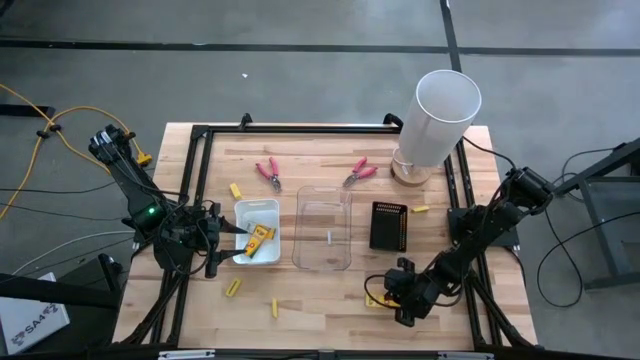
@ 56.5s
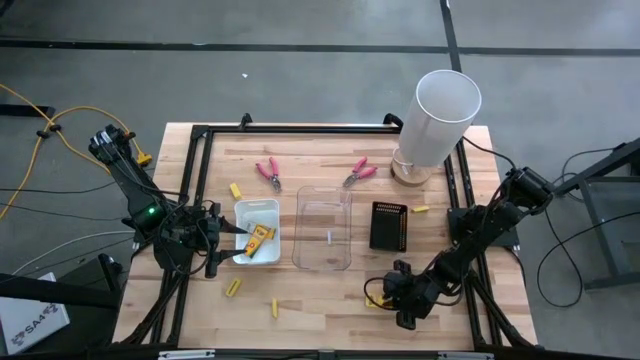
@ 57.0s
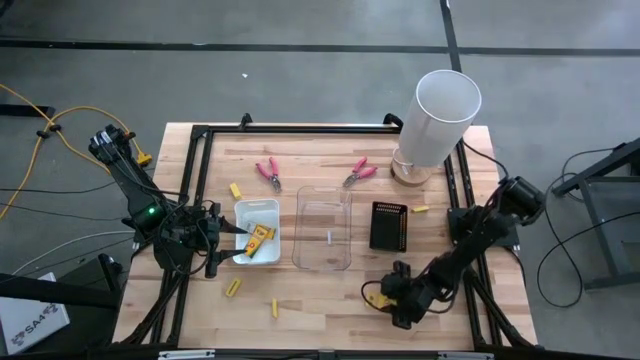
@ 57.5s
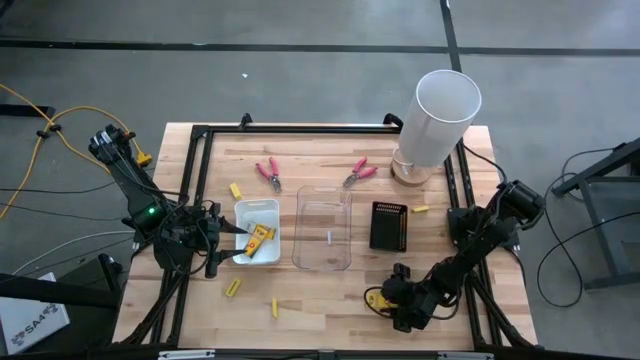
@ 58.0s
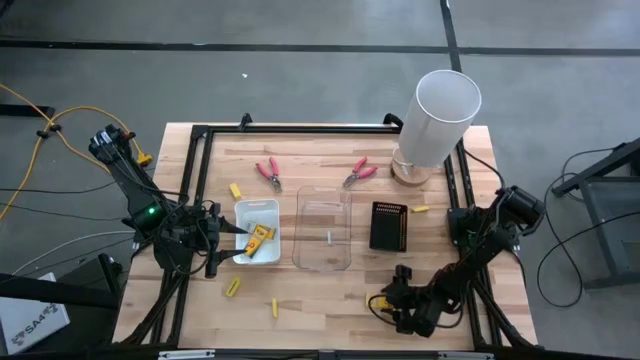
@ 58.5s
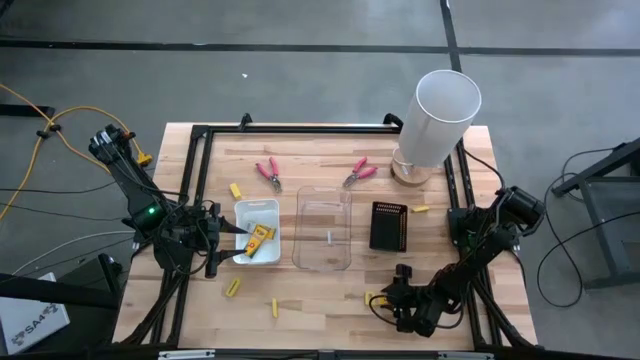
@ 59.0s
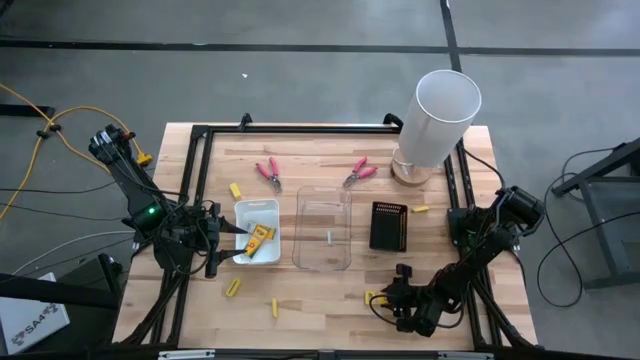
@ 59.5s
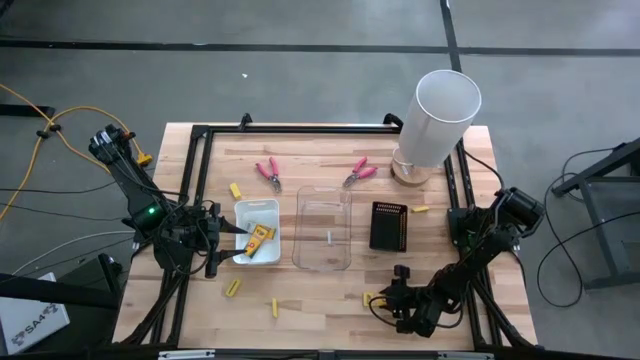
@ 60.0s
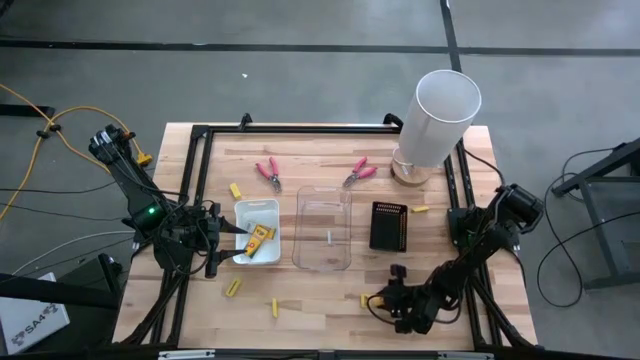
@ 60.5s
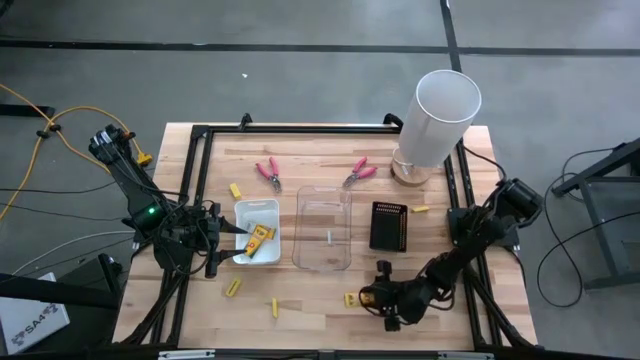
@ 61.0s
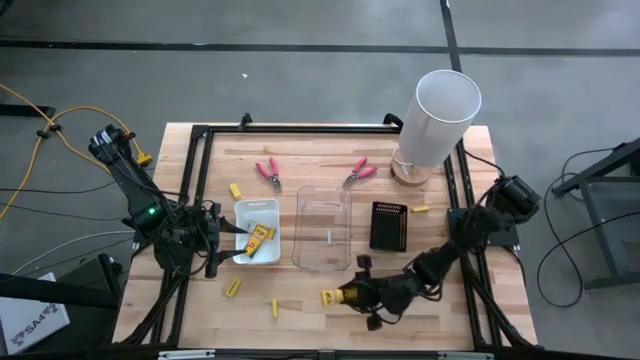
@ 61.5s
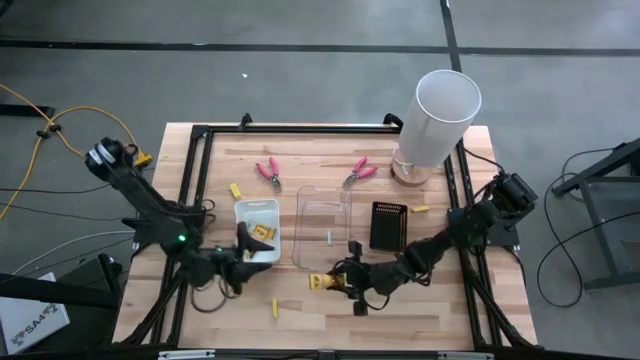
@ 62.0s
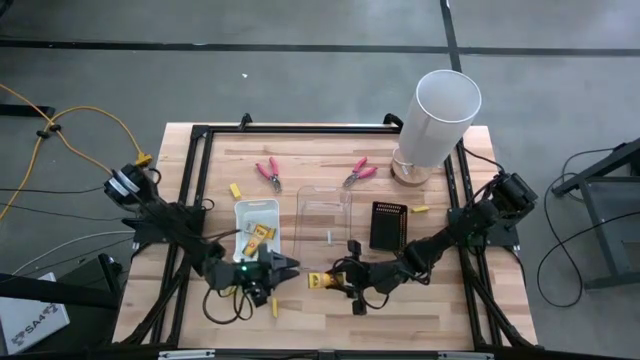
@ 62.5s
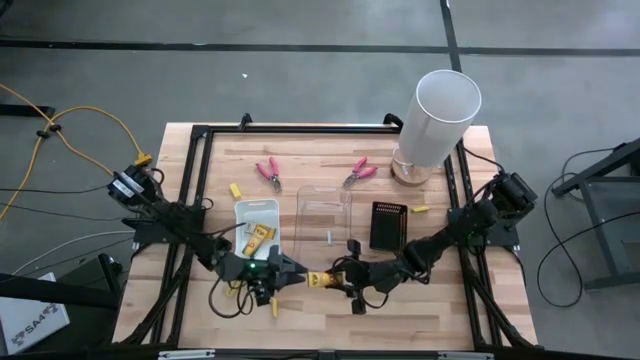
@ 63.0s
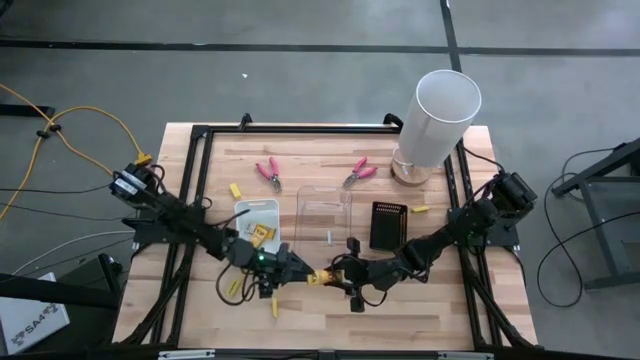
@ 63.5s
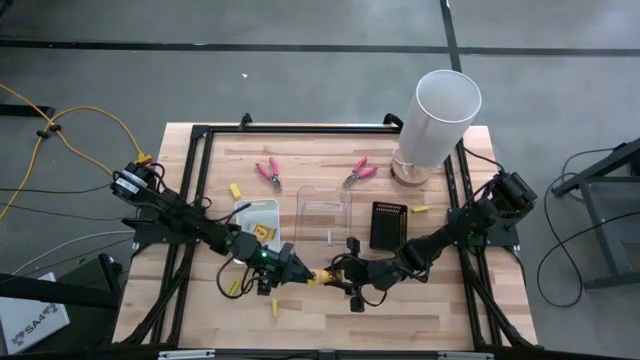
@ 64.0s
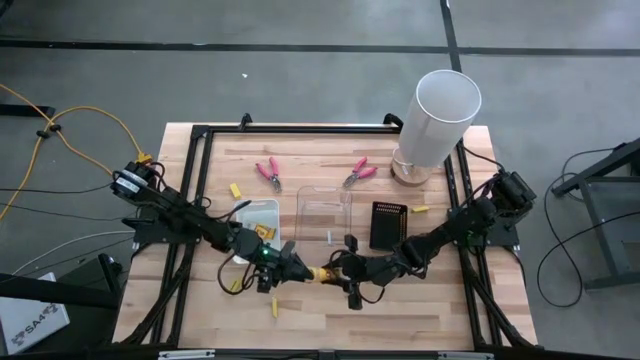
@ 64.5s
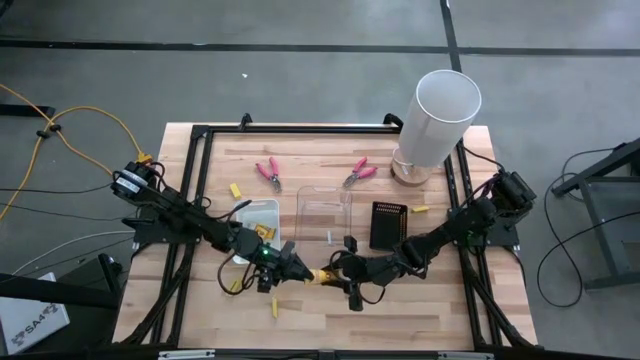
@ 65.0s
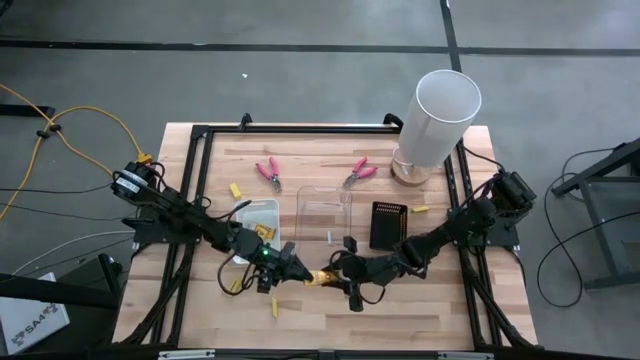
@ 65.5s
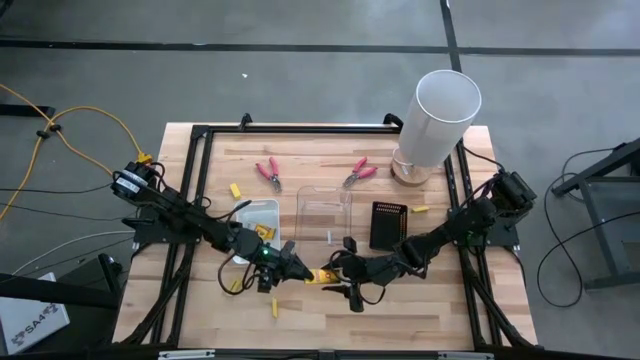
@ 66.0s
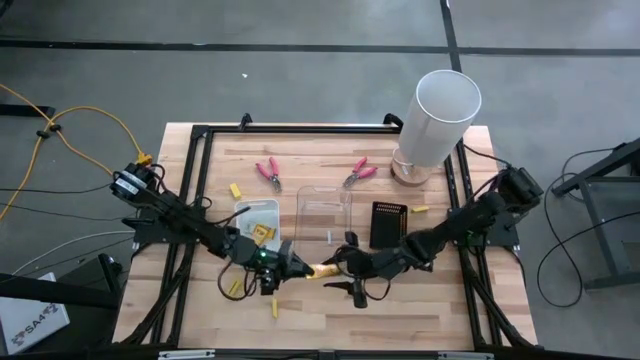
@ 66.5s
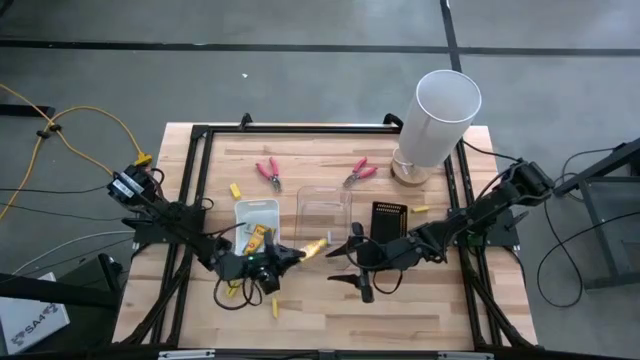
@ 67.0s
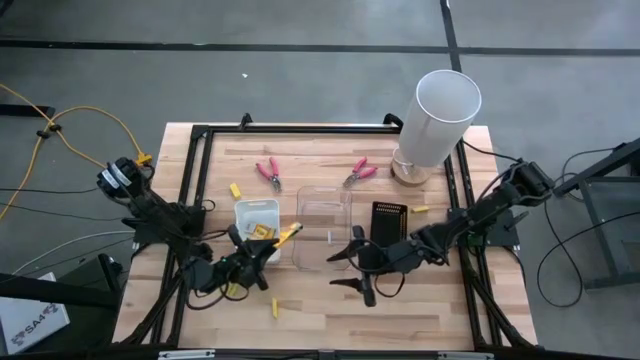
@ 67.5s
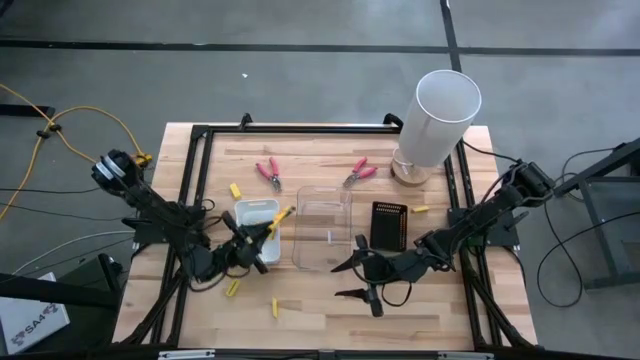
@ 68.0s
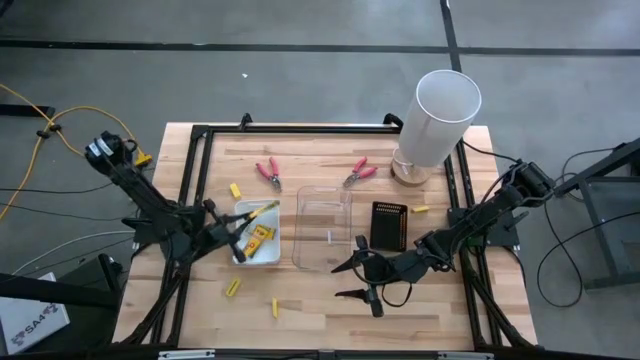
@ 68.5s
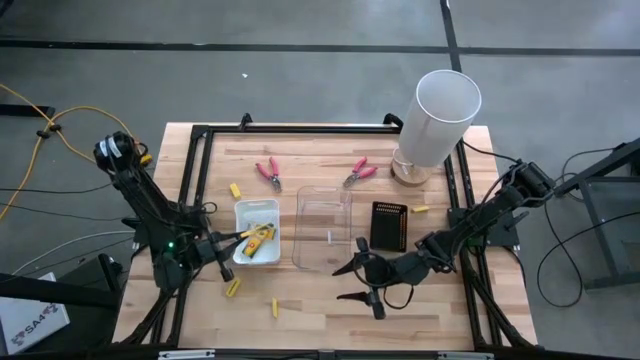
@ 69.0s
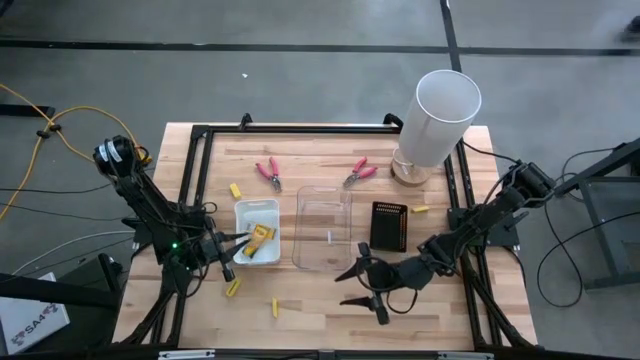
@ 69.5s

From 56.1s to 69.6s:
Task: Pick & Place School Supplies
Put the crayon box into the white bin

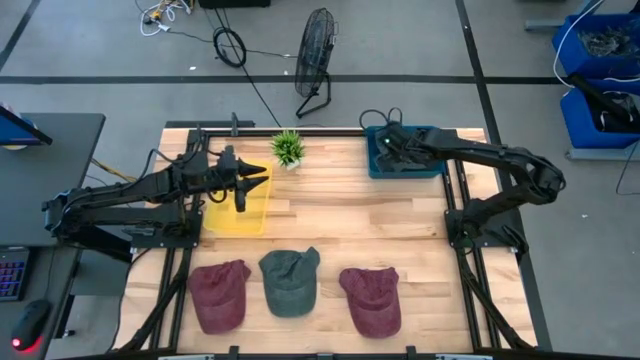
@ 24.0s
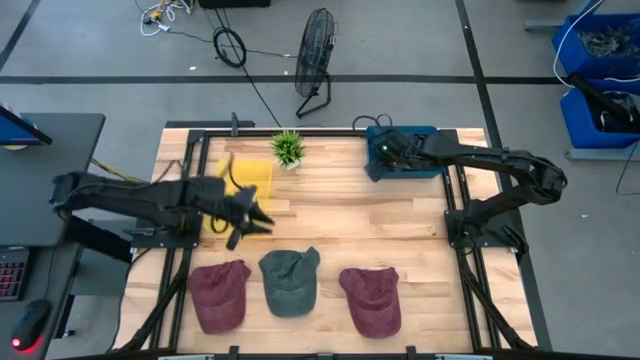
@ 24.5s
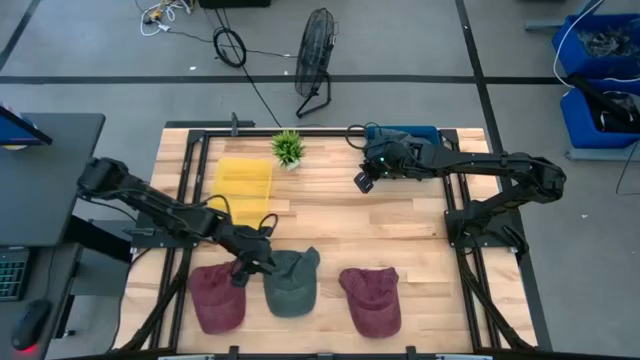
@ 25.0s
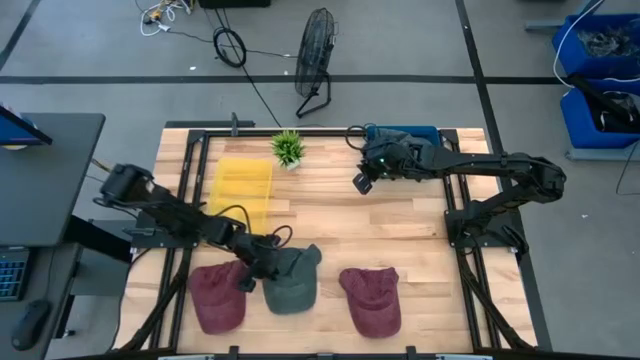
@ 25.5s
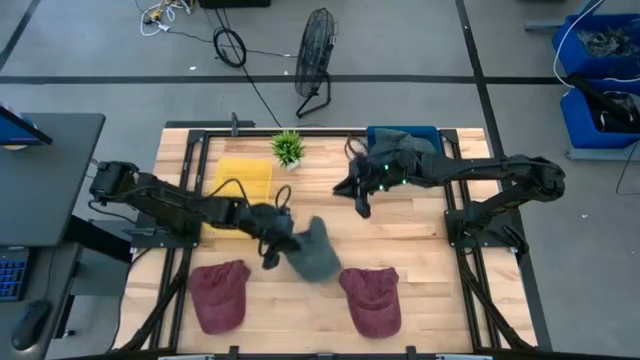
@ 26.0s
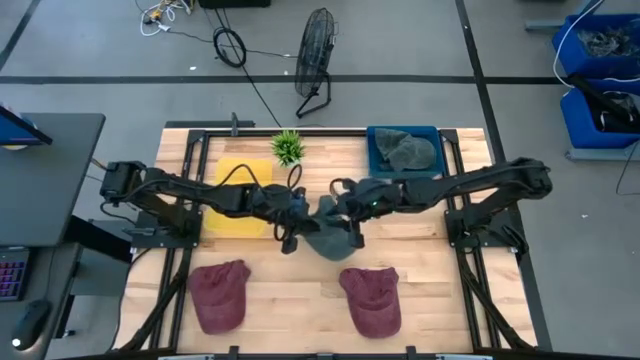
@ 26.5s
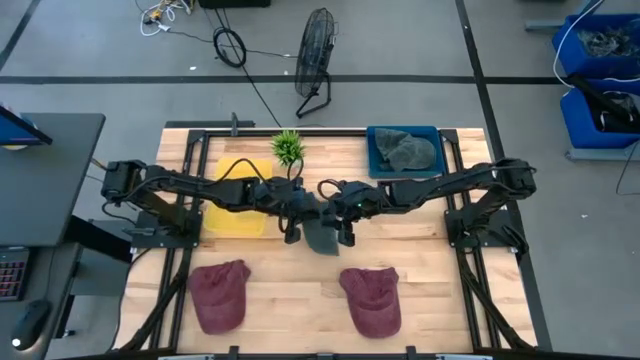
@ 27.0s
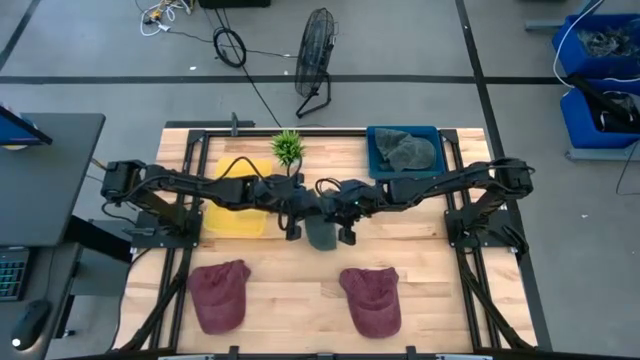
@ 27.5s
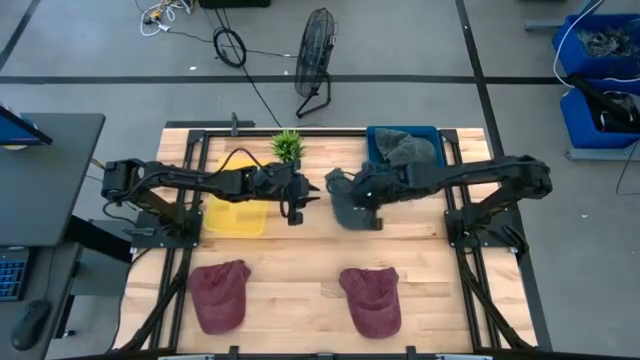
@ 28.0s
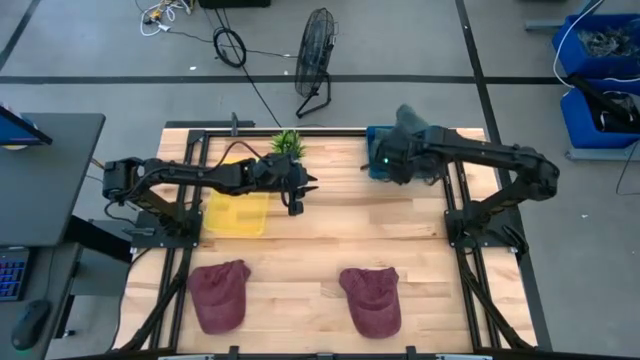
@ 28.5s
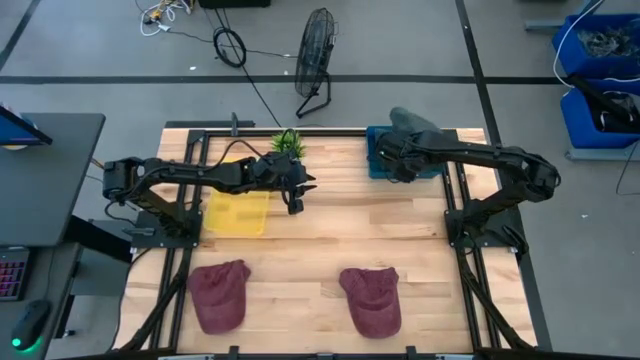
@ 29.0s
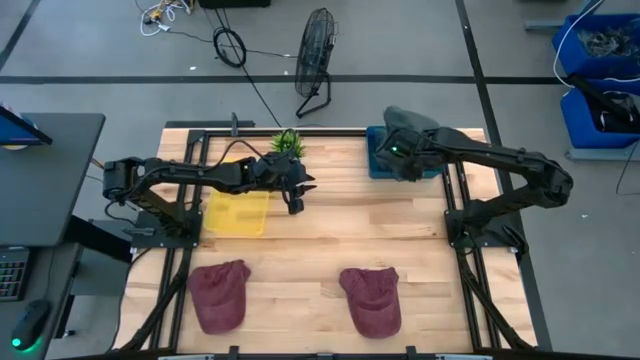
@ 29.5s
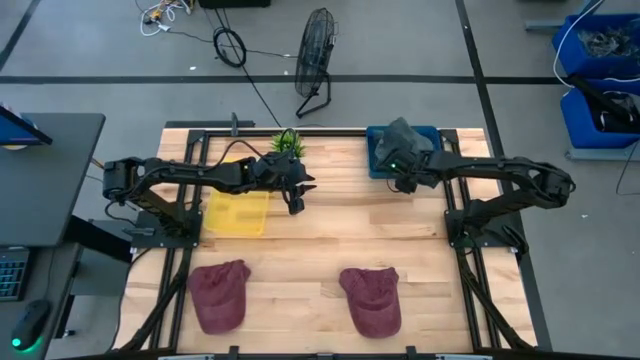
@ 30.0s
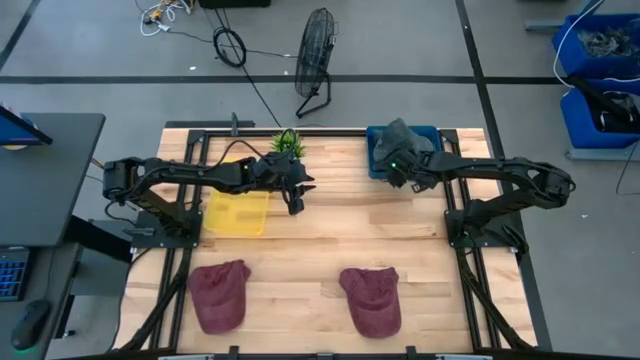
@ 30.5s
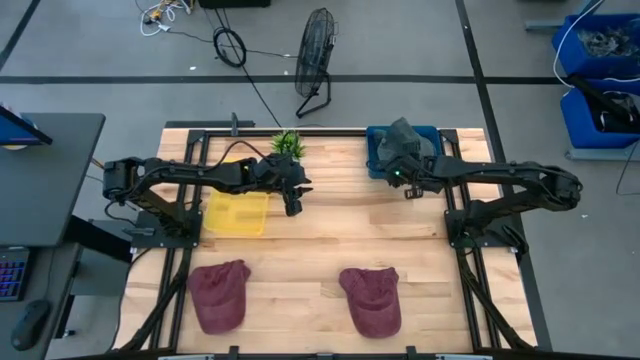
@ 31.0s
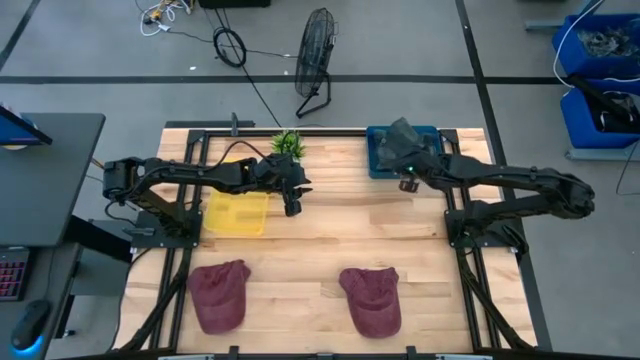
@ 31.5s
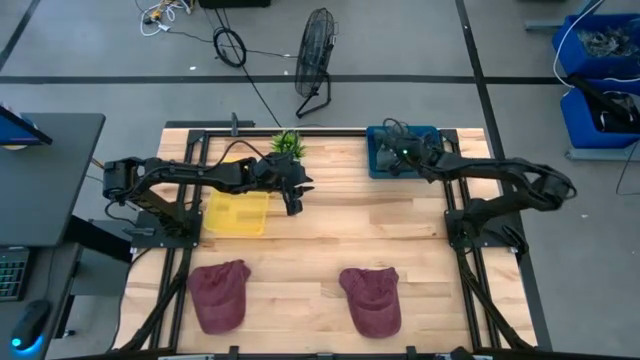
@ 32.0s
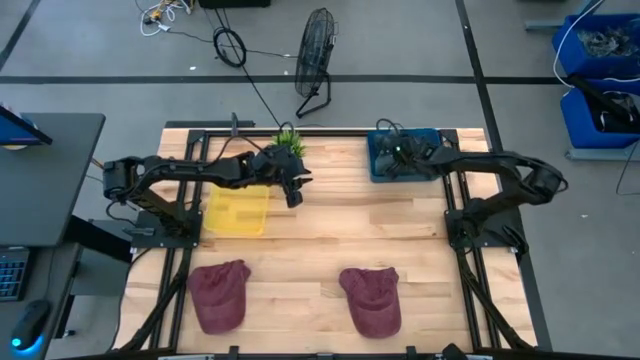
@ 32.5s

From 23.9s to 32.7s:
Task: Pick & Place hat
Put the gray cap into the blue bin
